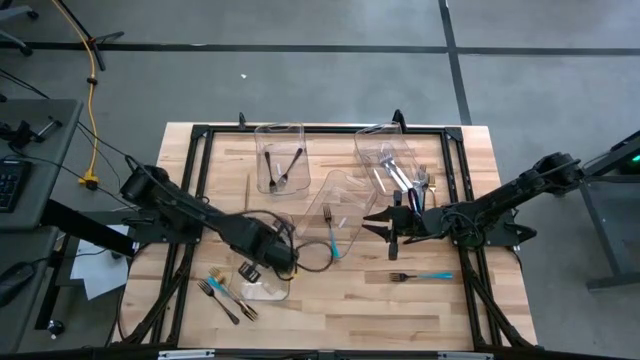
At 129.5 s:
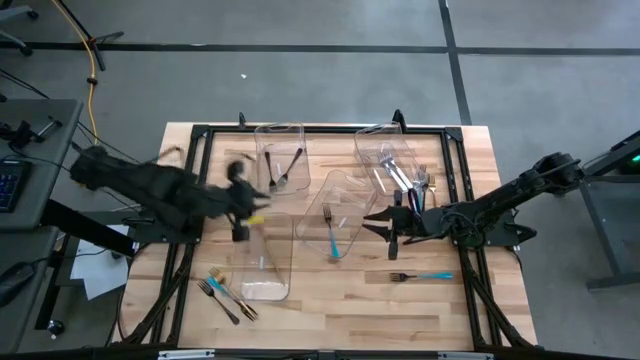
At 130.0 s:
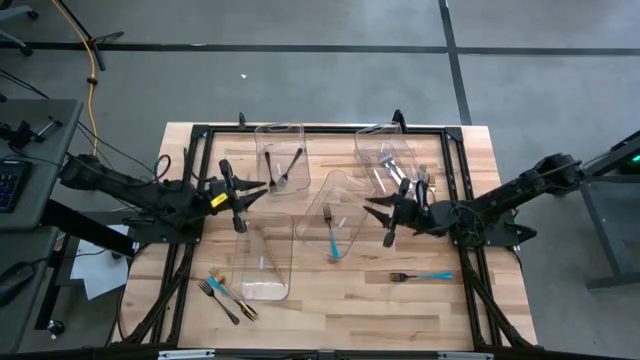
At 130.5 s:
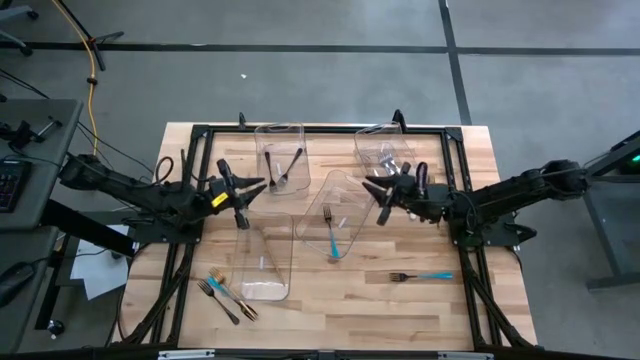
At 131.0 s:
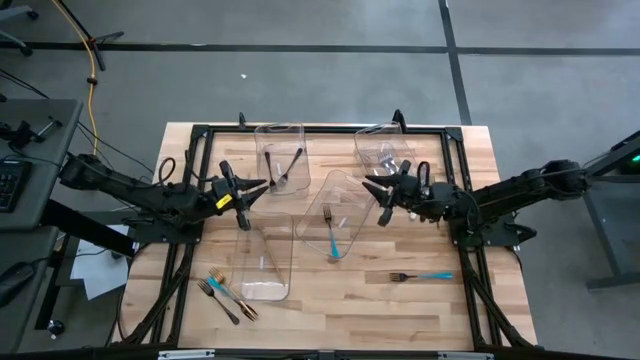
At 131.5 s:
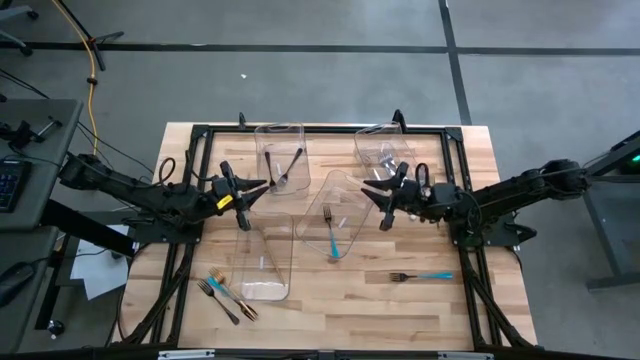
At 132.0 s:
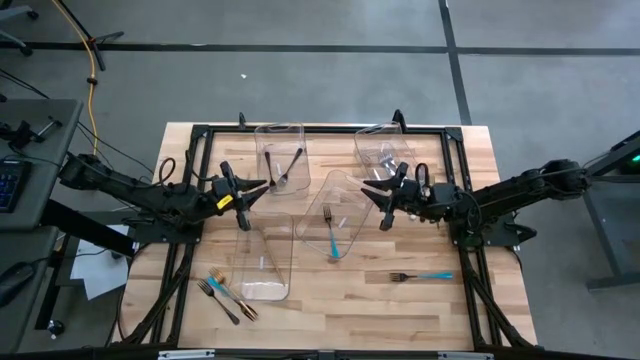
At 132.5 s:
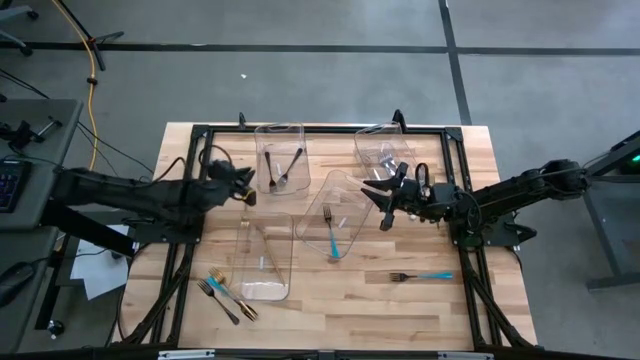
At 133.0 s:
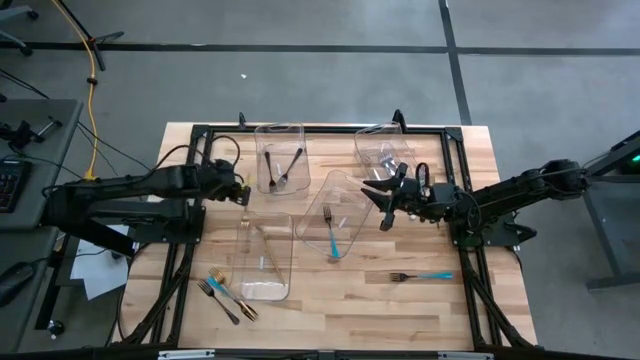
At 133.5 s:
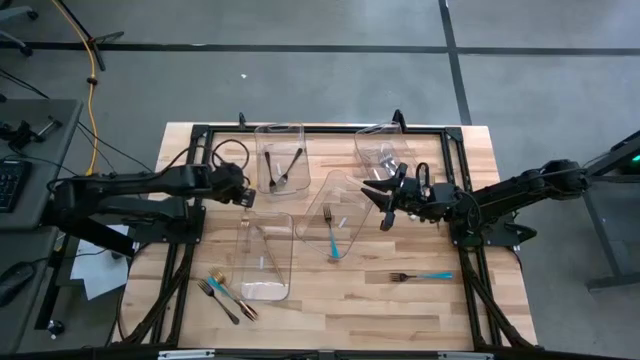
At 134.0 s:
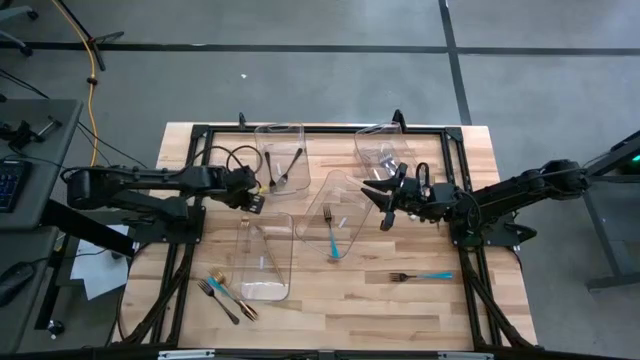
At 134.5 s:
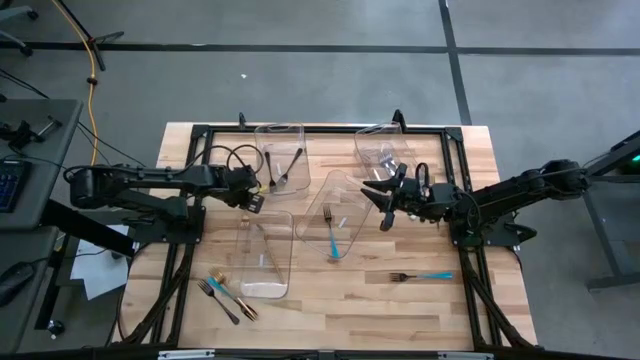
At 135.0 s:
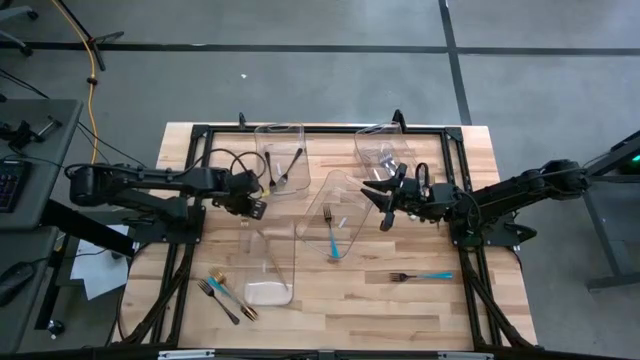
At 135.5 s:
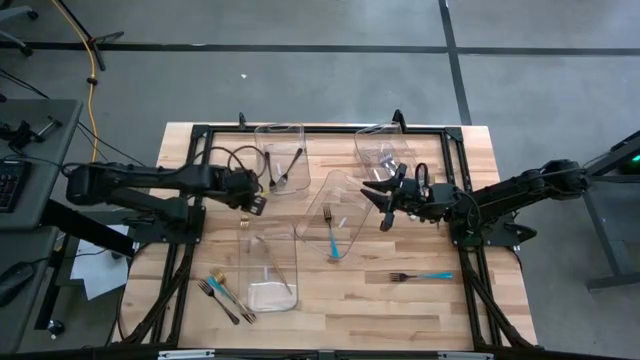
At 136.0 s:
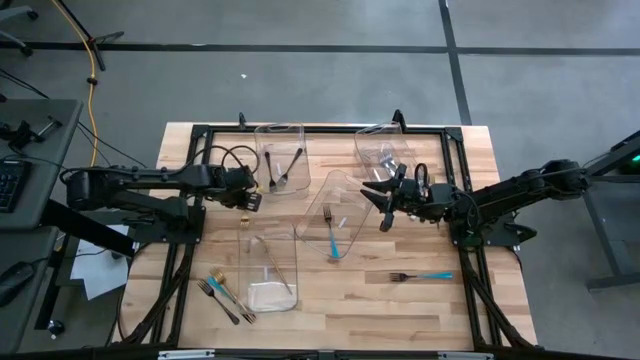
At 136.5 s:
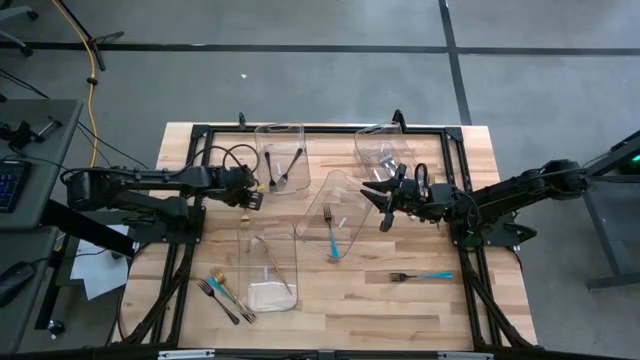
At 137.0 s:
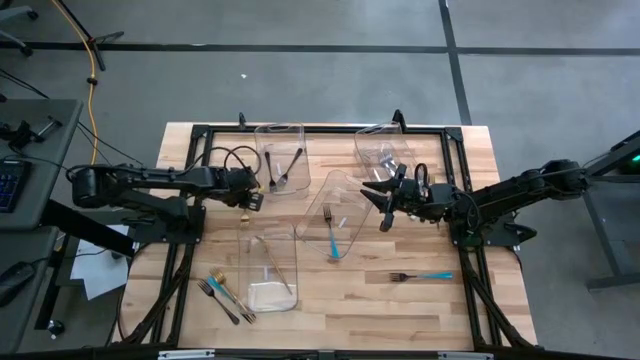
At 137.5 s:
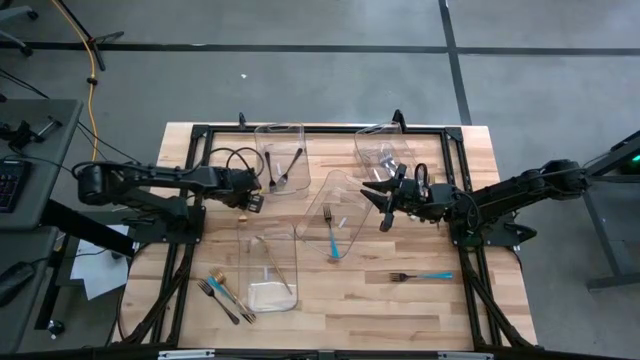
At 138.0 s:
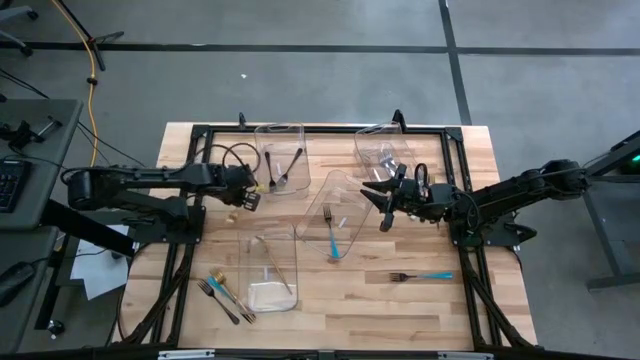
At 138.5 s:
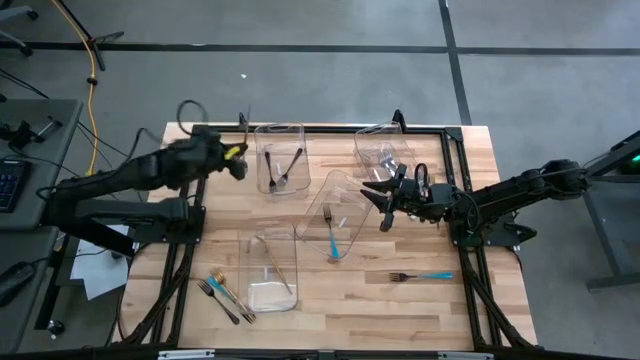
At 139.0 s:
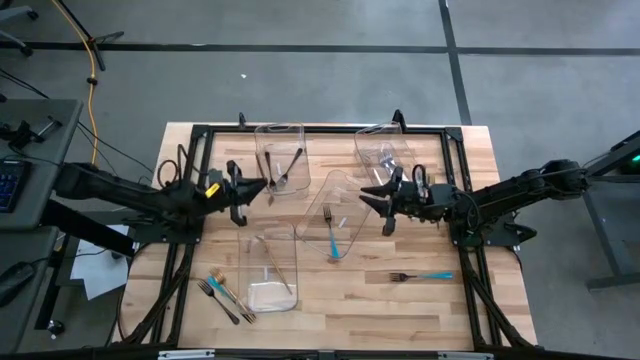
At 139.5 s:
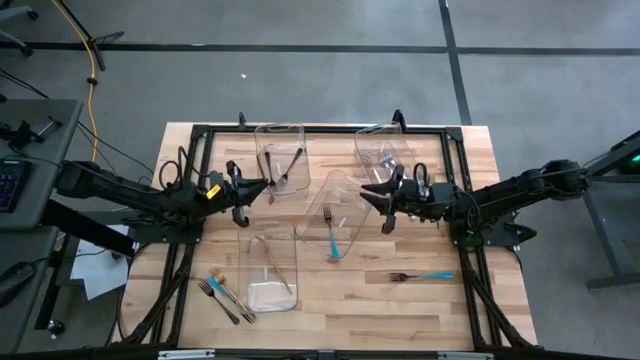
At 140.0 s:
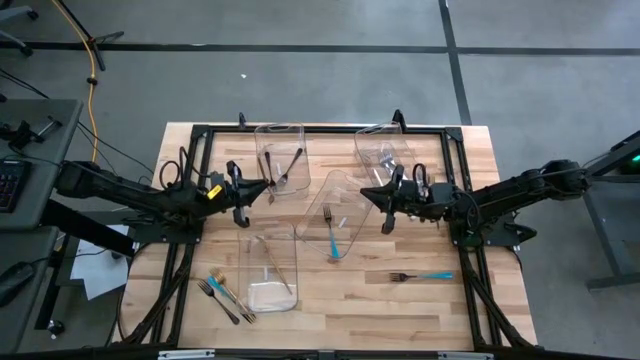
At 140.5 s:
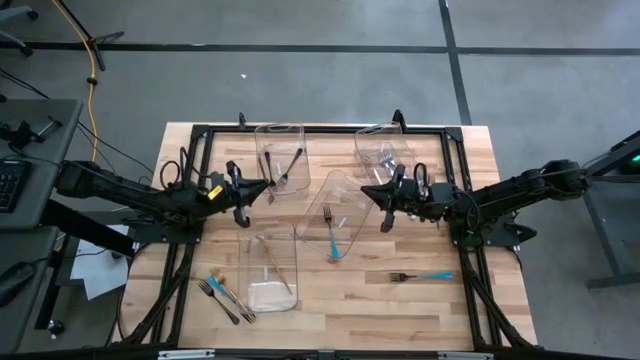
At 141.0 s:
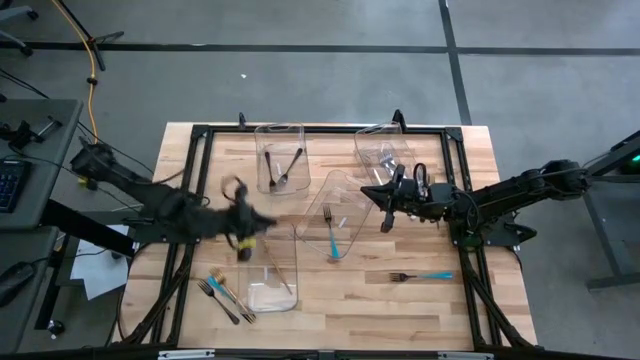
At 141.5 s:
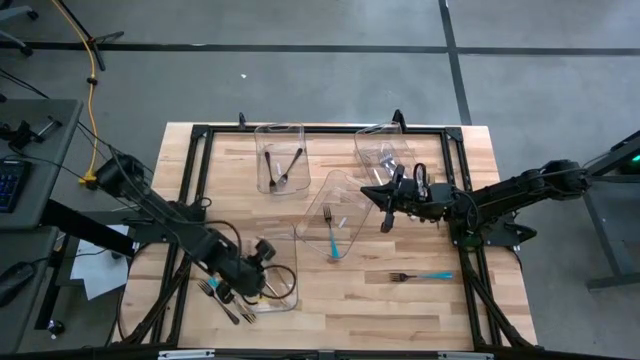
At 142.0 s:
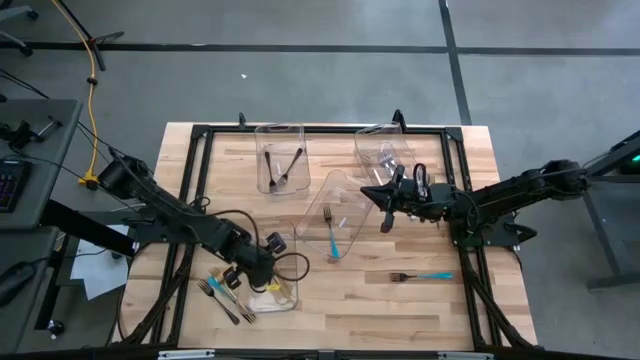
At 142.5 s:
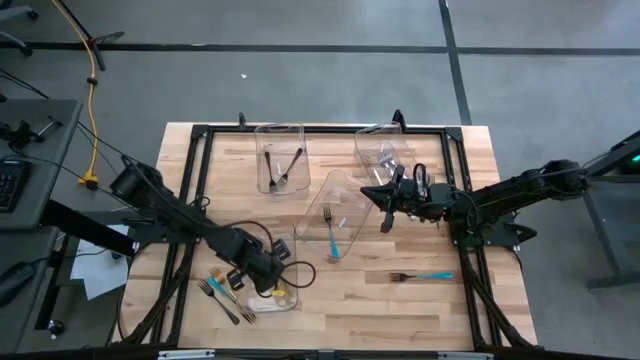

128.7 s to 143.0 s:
Task: Sort silverware by color (type)
Put the gold fork into the bottom left transparent bin

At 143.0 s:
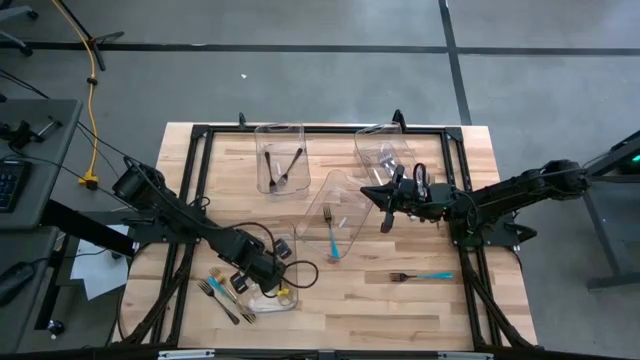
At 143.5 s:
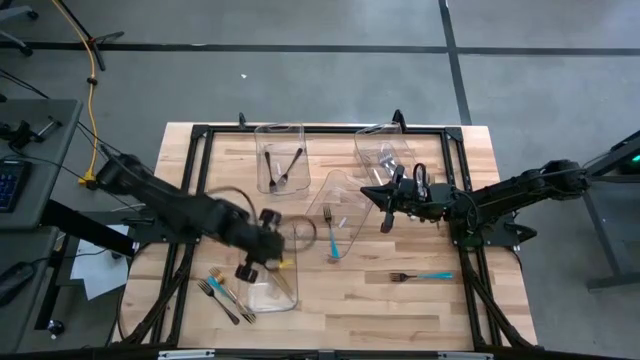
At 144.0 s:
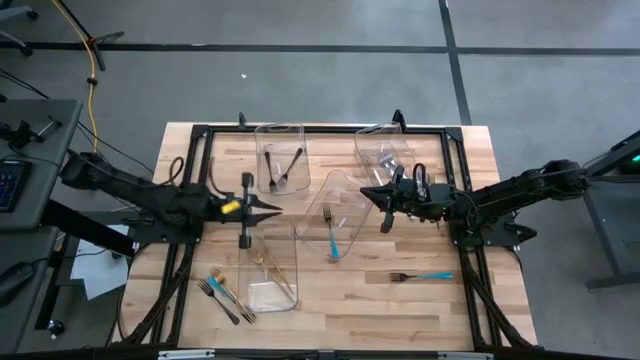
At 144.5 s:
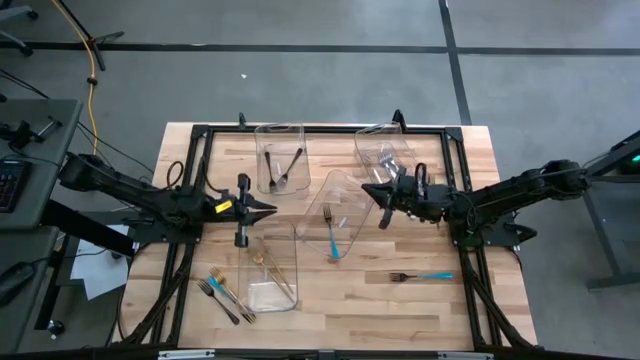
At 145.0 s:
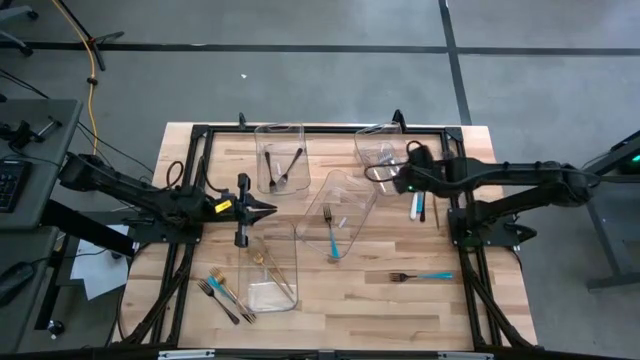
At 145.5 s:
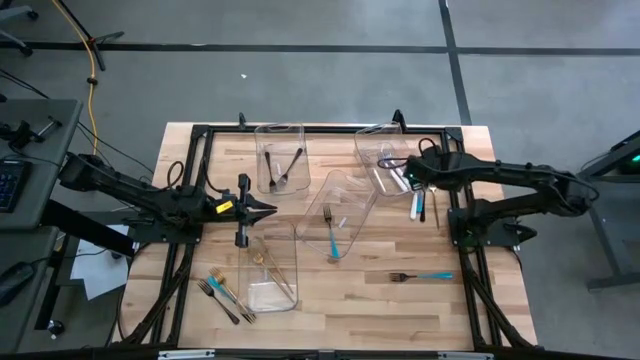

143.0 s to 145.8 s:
Adjust the top right transparent bin on the table

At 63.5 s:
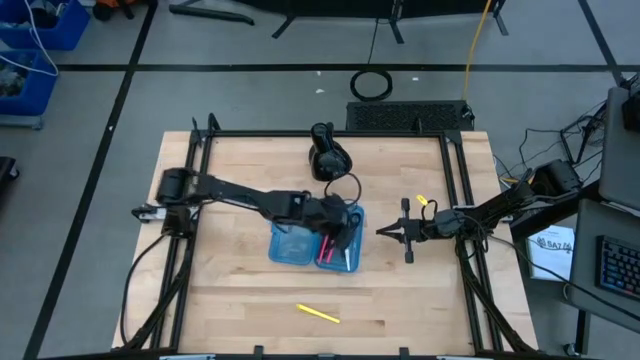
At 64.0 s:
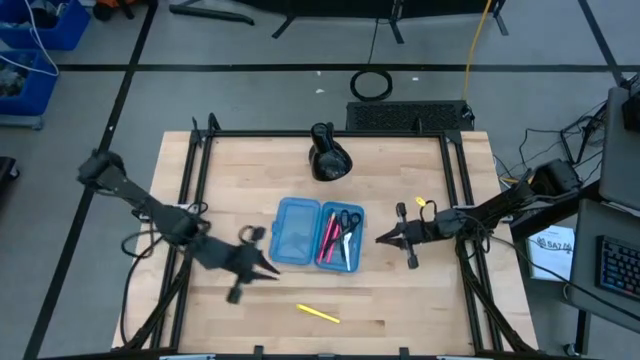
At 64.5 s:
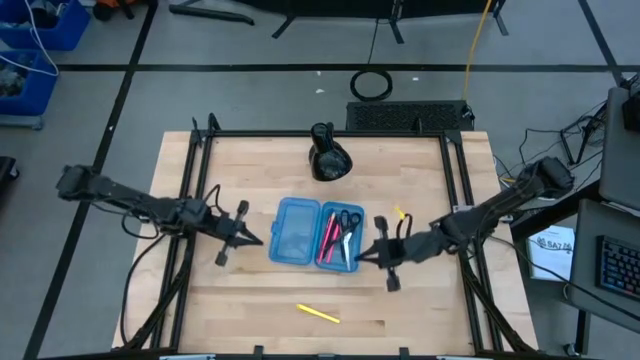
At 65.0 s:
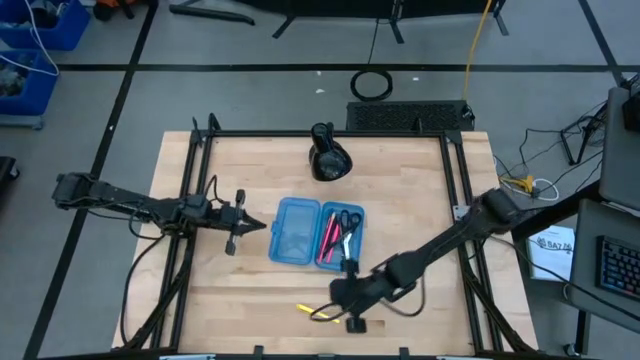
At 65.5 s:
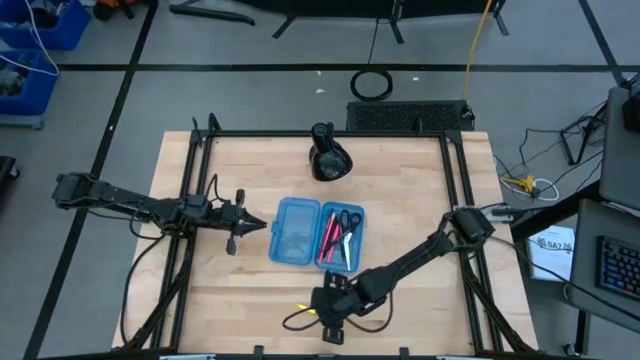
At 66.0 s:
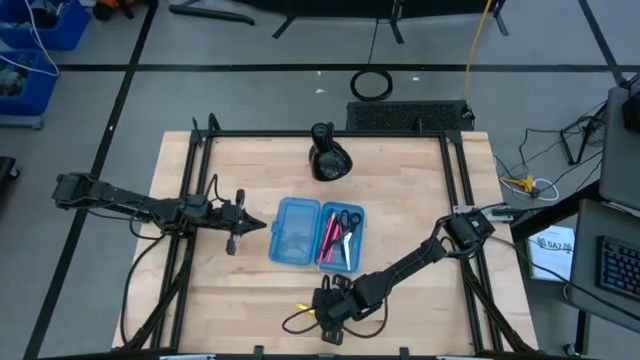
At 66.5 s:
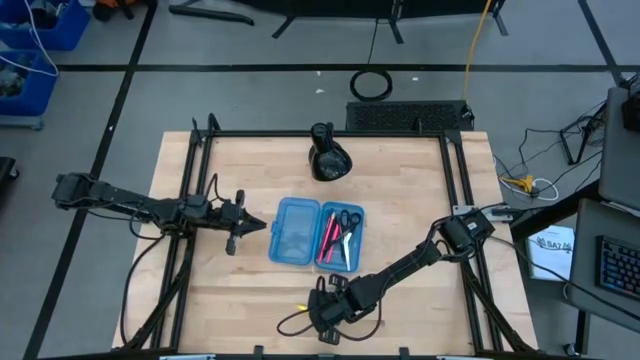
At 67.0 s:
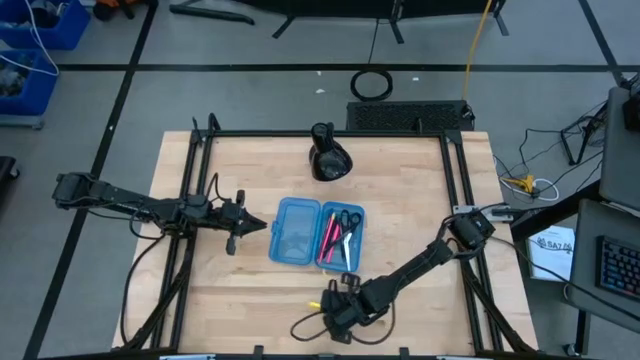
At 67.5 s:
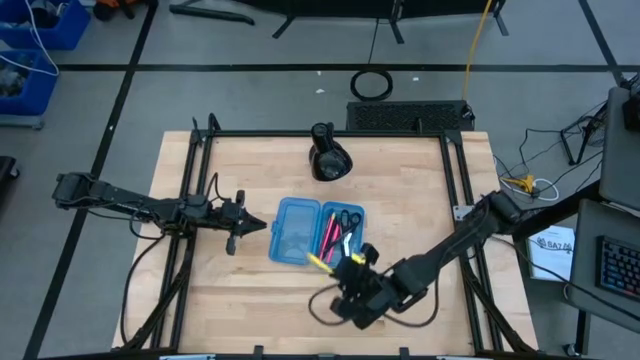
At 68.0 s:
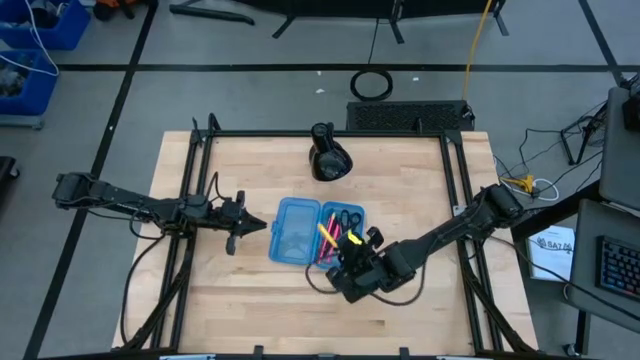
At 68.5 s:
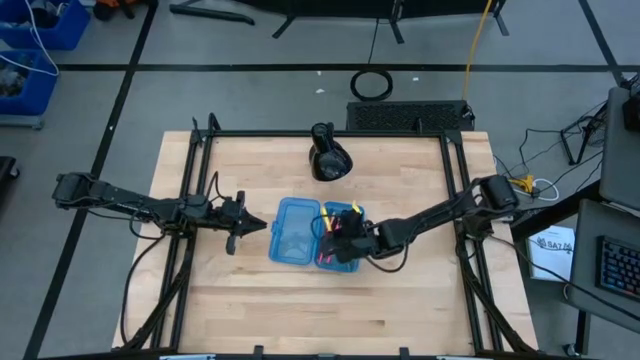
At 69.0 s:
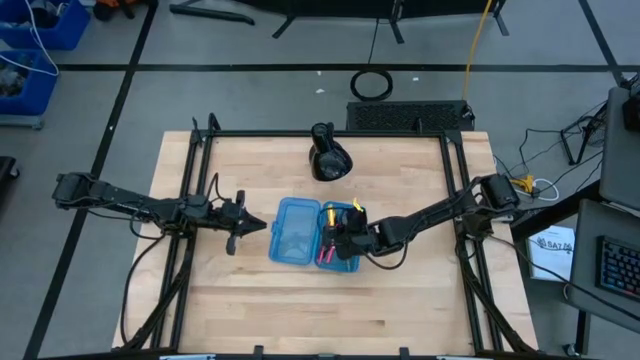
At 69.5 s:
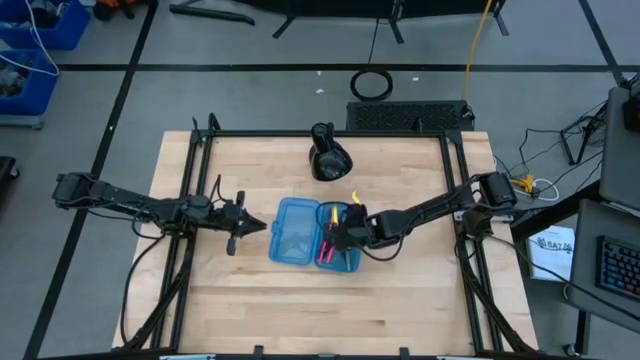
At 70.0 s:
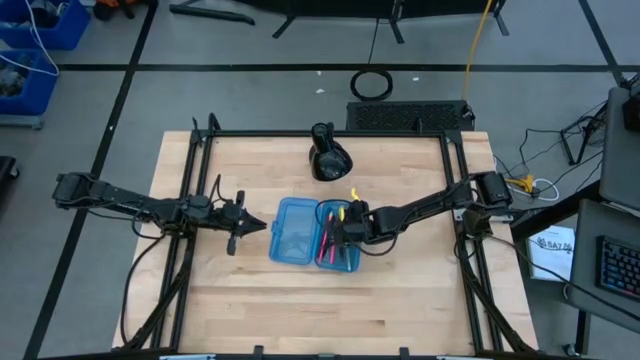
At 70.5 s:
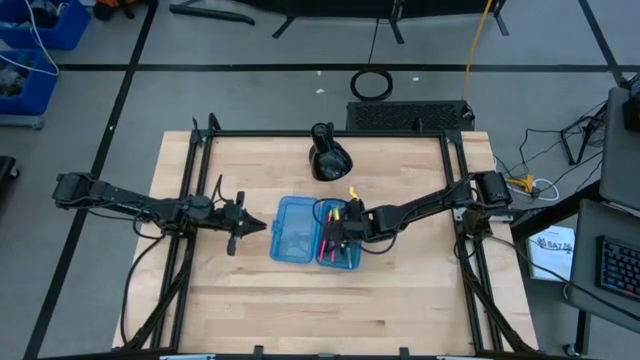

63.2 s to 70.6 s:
Task: Pick & place school supplies into a supply box
Put the yellow pen into the blue supply box
